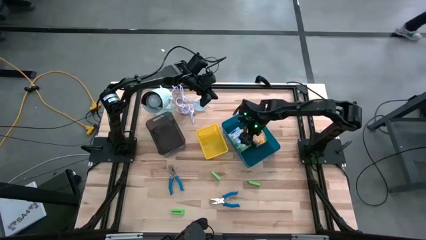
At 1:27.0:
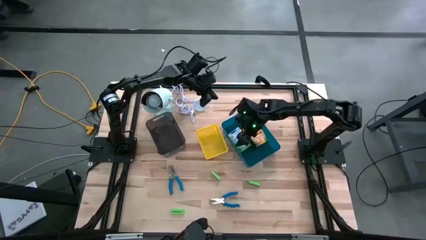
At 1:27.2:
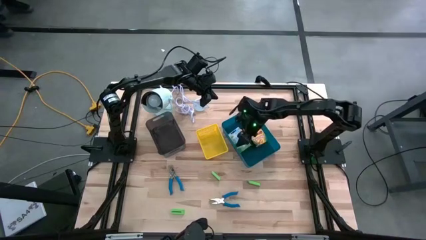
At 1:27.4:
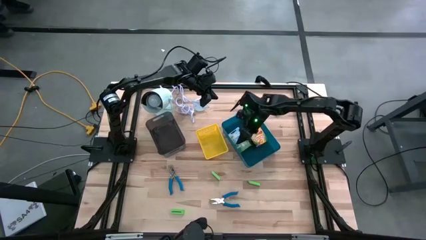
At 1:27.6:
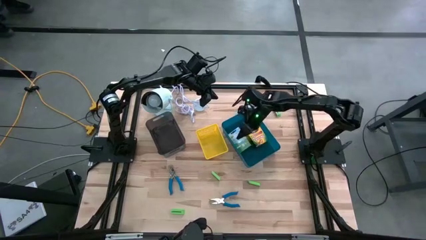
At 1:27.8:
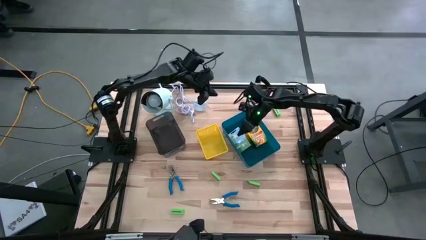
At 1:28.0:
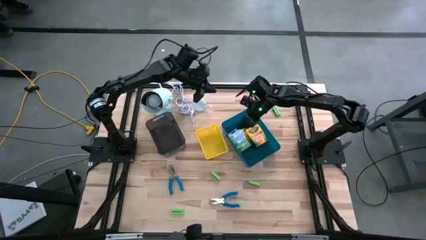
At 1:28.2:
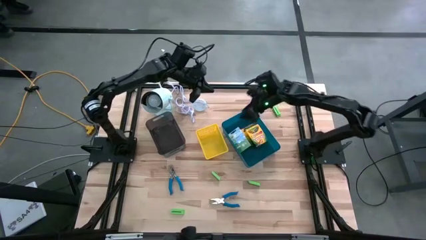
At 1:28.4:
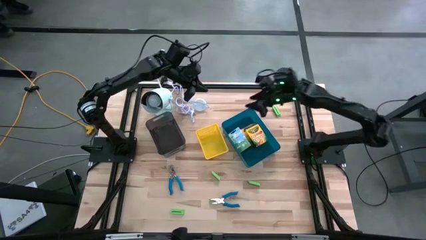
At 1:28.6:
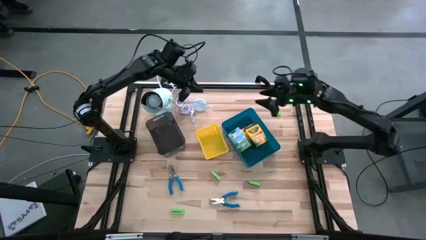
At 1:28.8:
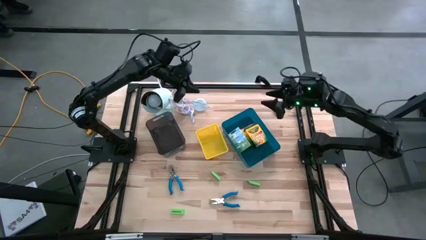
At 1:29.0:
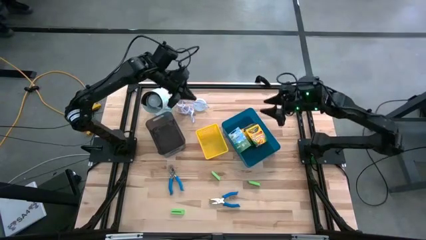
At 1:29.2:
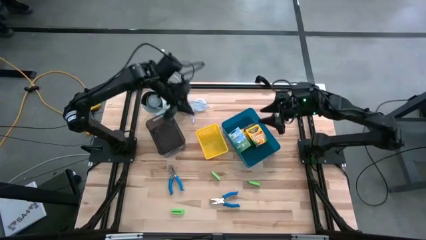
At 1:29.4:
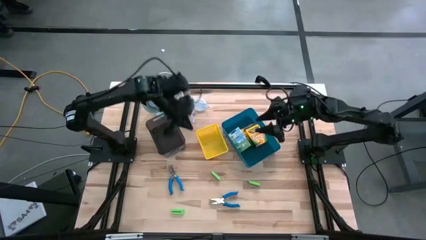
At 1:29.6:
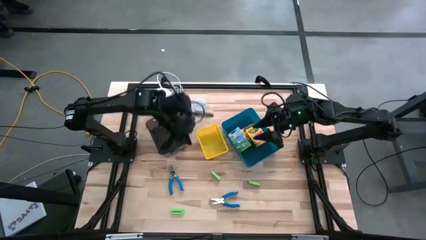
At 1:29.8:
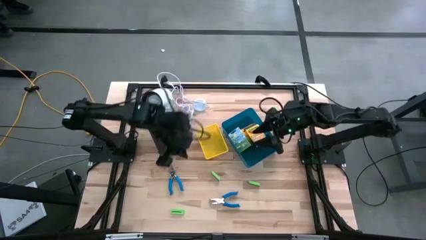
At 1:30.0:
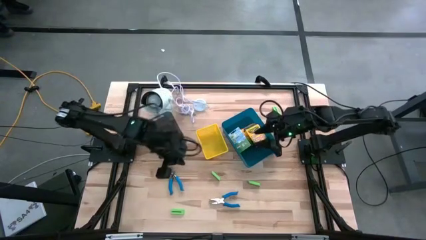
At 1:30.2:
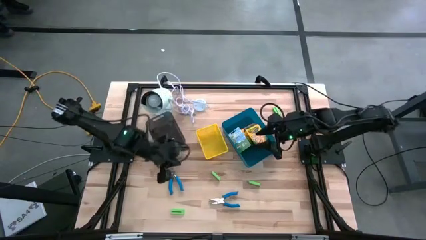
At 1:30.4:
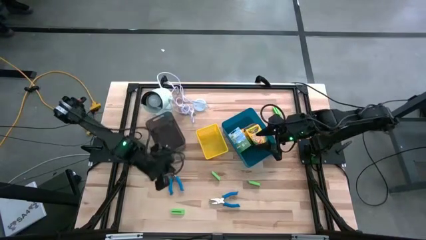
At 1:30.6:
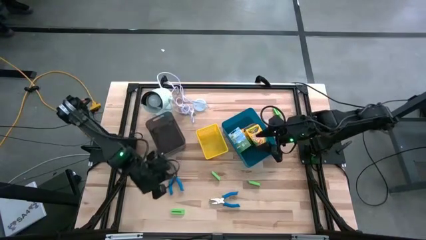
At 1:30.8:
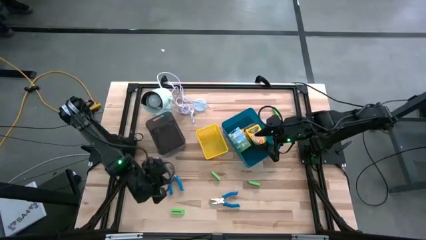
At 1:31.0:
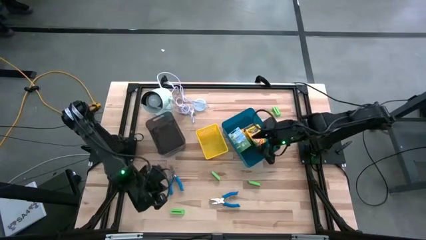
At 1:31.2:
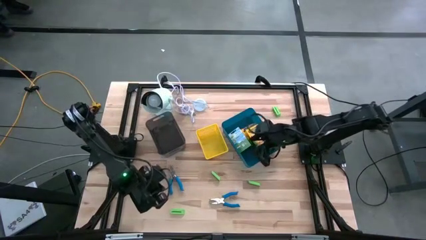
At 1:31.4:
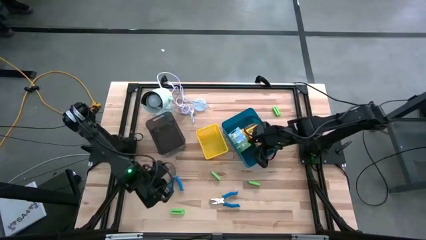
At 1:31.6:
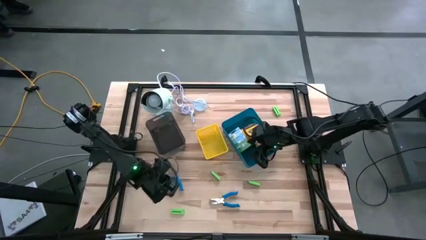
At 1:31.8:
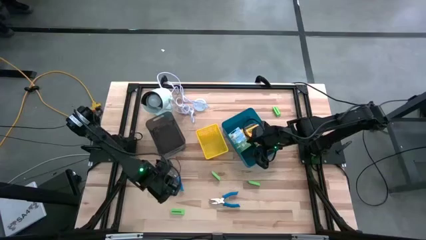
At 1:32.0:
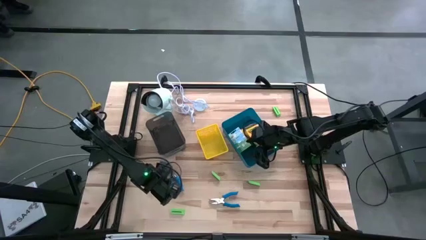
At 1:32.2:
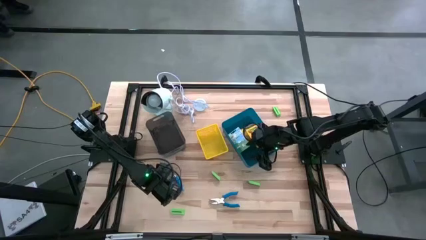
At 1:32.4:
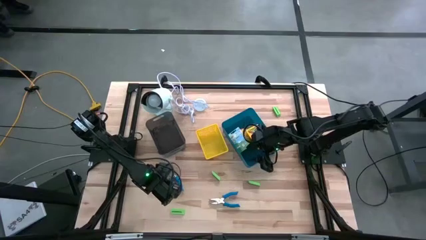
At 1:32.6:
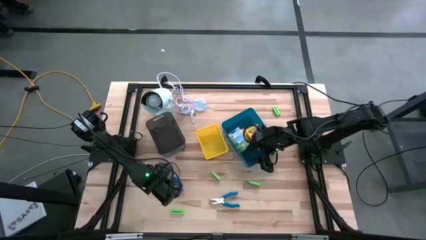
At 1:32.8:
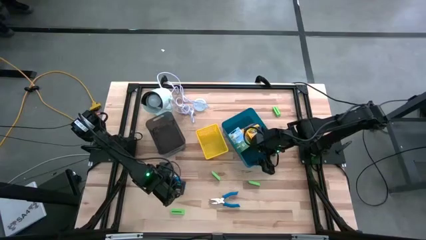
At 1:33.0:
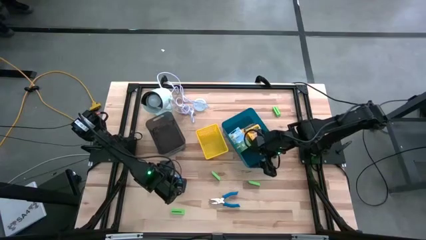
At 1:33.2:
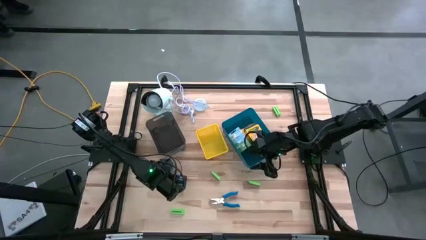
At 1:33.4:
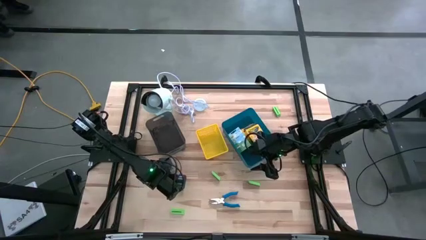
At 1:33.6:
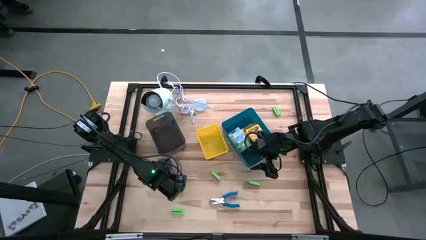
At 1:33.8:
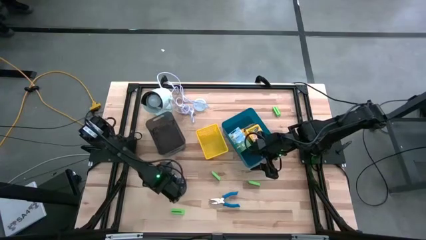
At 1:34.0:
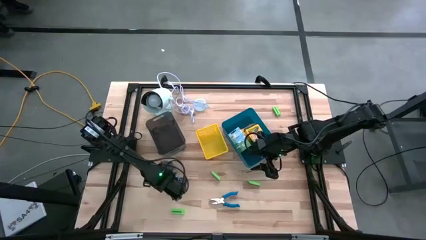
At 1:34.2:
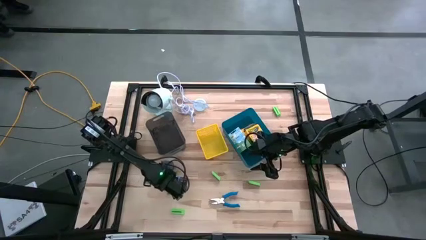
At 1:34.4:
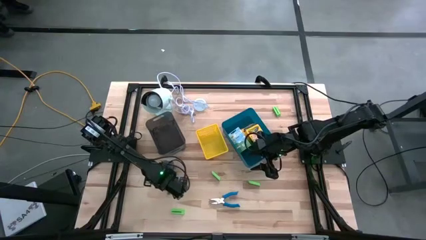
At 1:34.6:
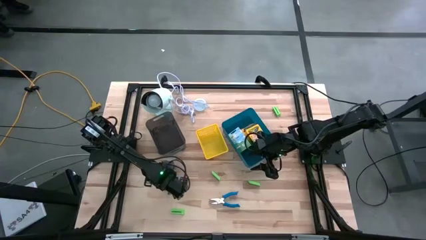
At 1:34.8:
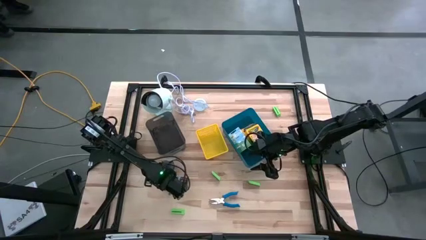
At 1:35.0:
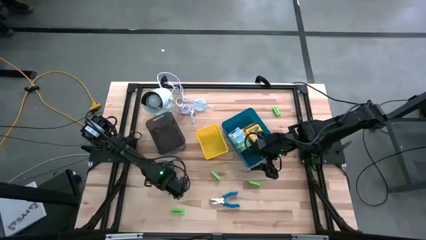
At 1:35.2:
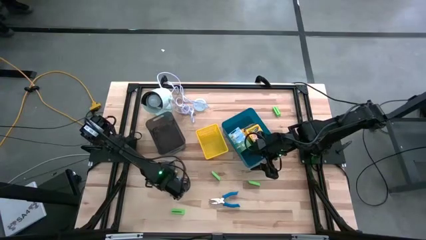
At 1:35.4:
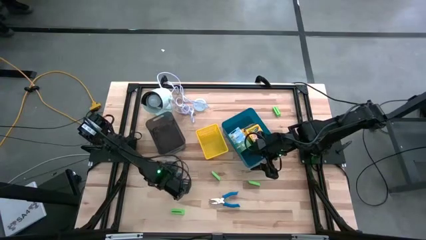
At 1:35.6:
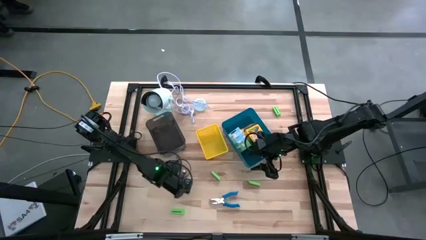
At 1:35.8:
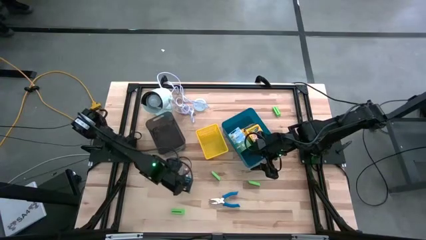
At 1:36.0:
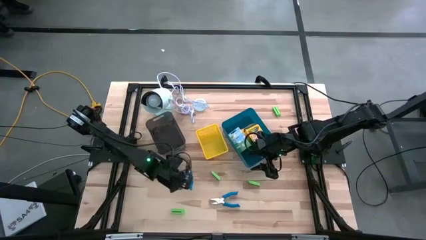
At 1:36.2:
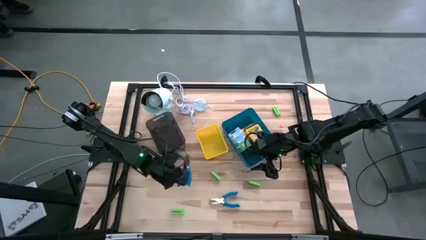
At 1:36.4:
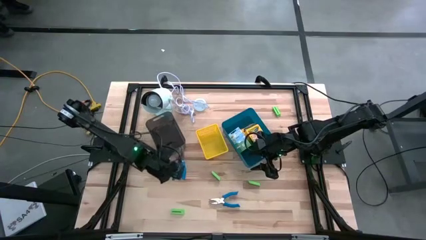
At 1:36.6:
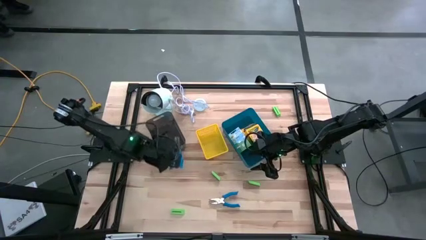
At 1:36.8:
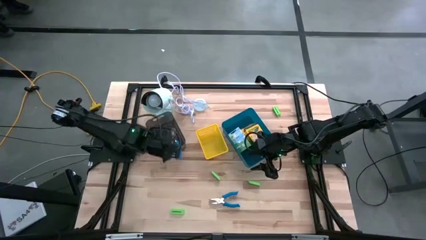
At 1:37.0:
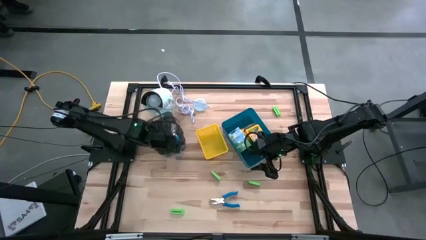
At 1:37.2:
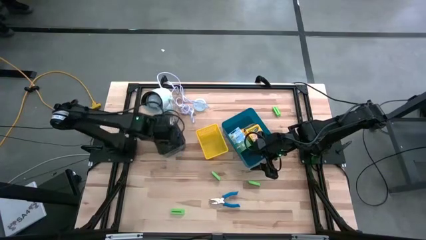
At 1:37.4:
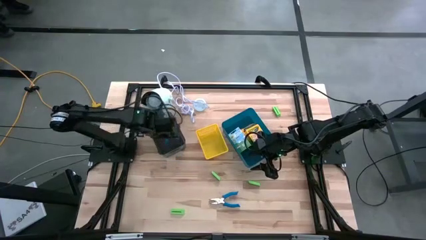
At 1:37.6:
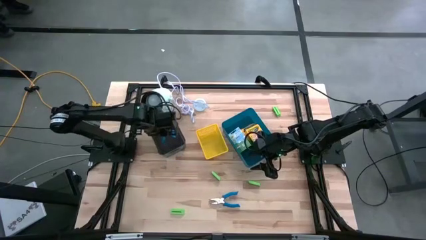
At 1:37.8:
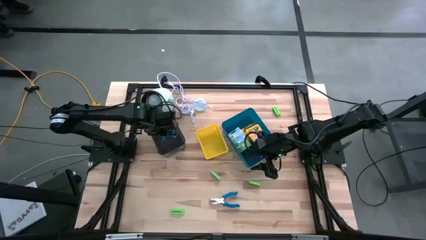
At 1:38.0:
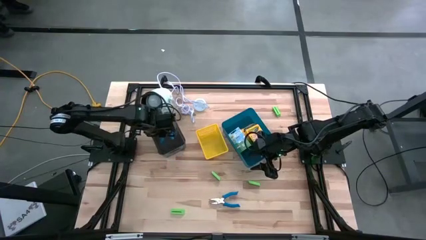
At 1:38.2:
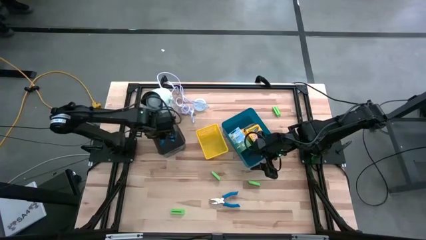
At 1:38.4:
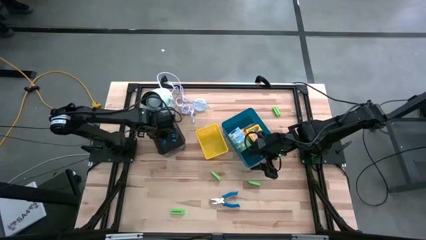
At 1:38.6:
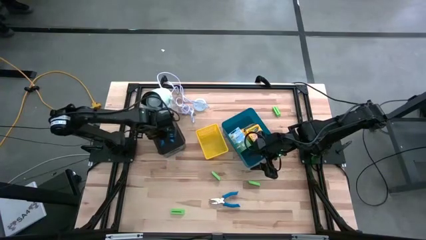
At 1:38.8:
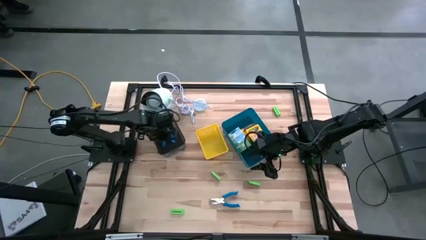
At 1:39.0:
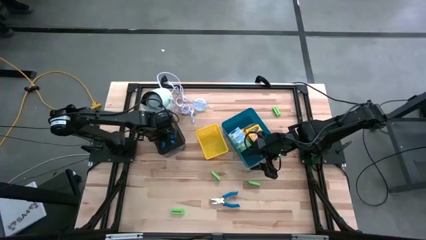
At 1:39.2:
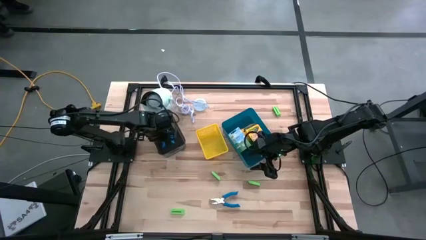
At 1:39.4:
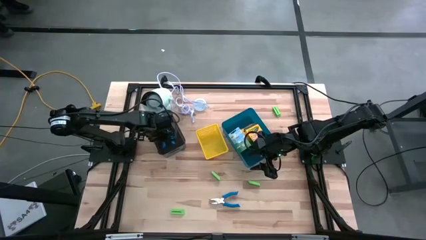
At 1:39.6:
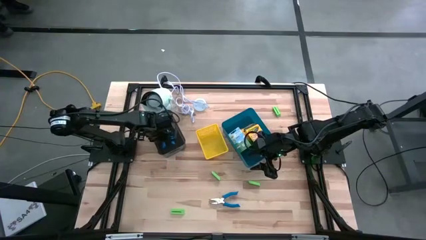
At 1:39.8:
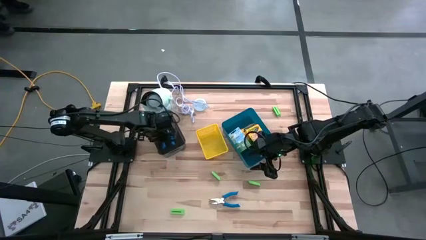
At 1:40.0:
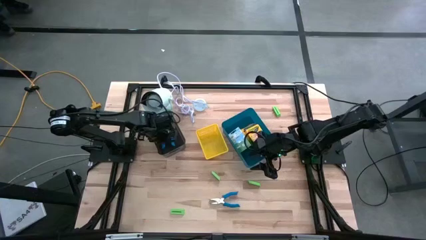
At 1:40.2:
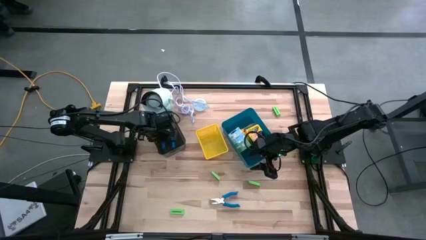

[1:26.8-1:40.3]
Task: Pick & Place School Supplies
Put the blue hole puncher into the transparent black bin
